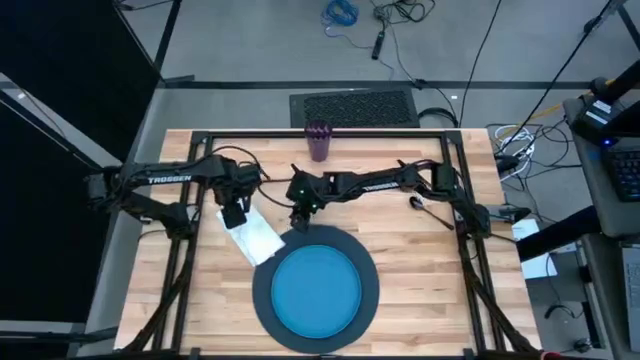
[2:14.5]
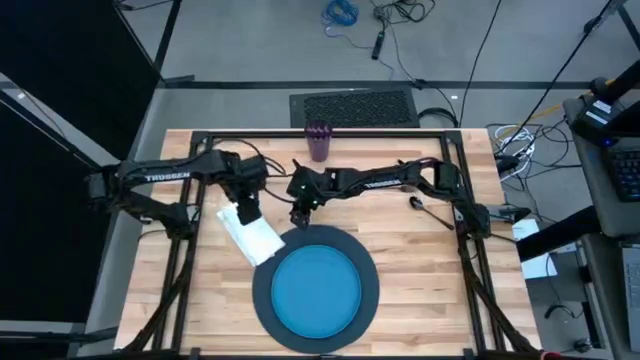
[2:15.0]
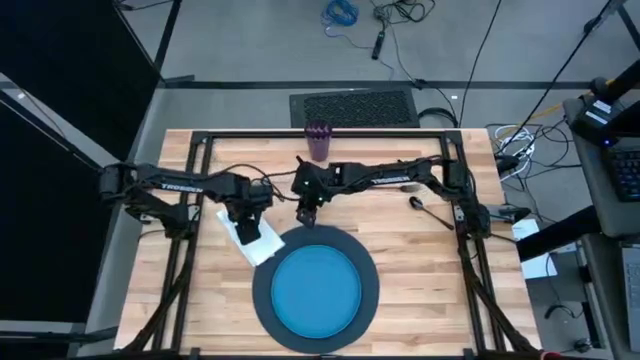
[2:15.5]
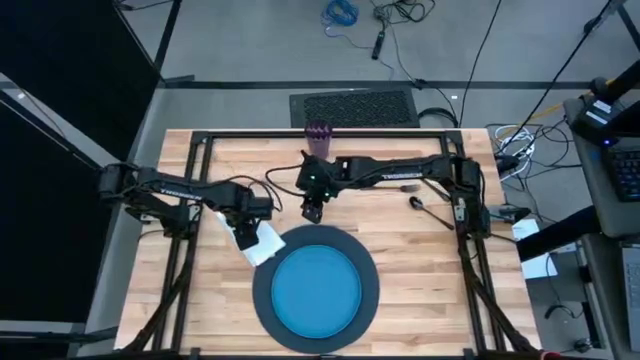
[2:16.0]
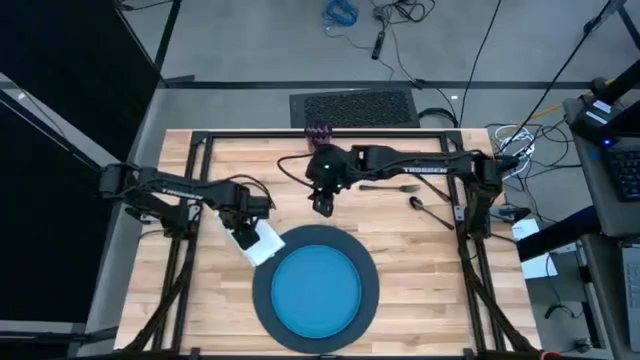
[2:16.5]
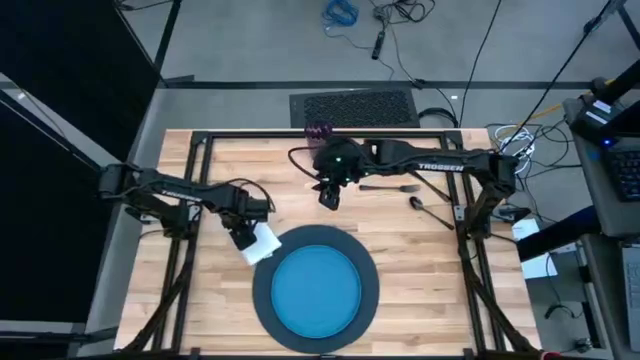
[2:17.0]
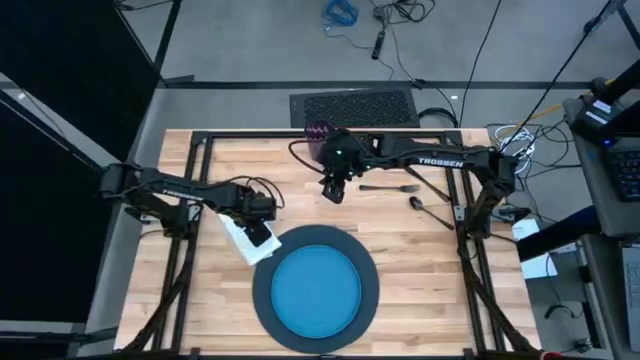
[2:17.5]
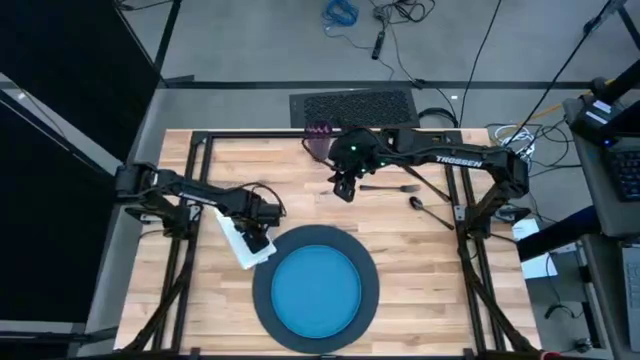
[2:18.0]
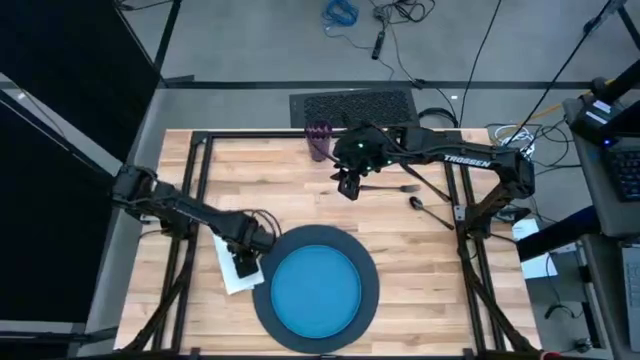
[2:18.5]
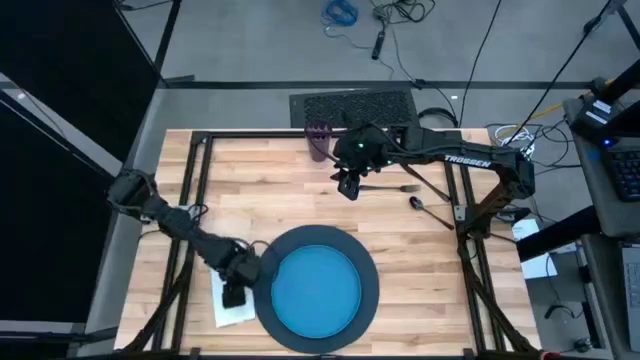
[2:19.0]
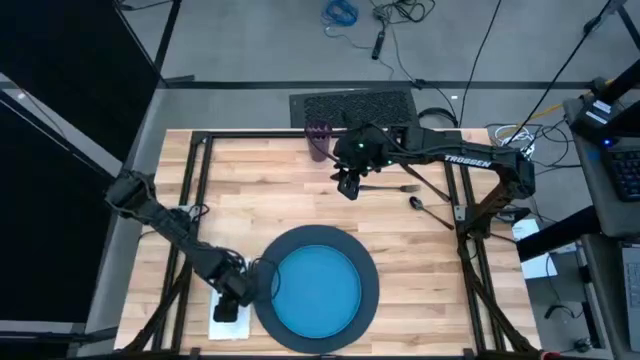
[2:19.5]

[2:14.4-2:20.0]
Task: Set table place
Move the white table napkin to the left of the dark blue placemat

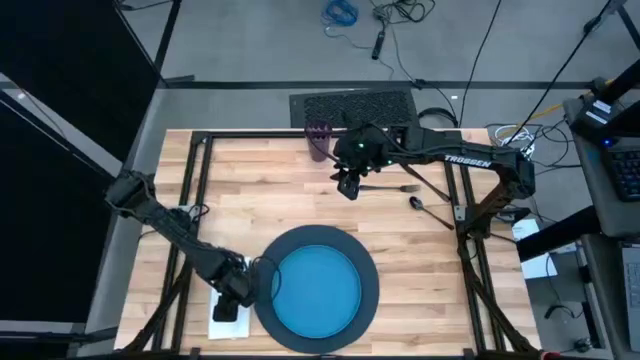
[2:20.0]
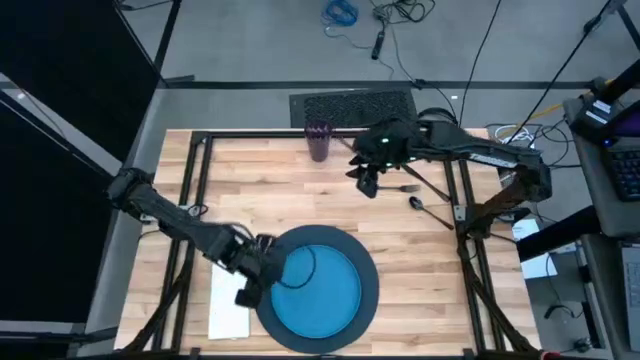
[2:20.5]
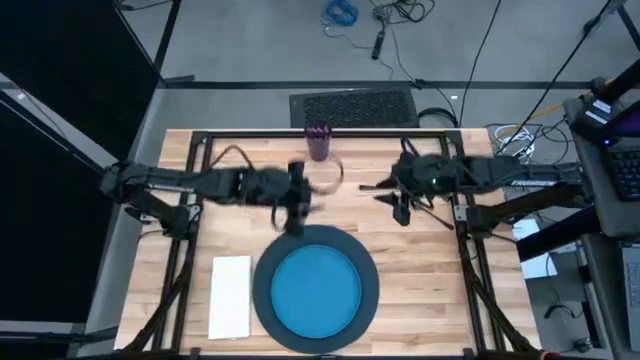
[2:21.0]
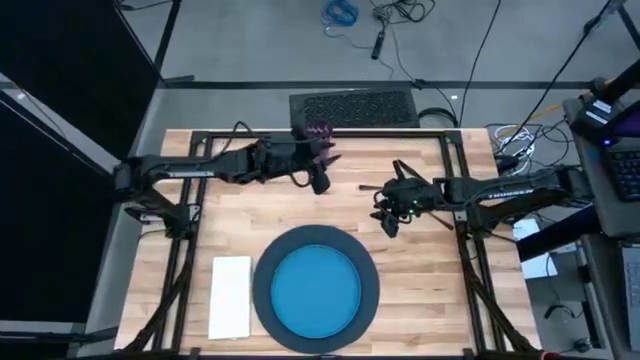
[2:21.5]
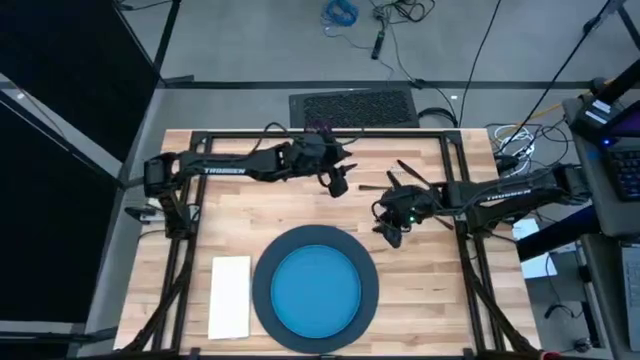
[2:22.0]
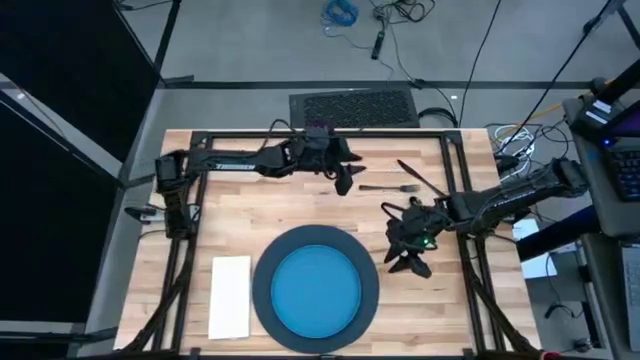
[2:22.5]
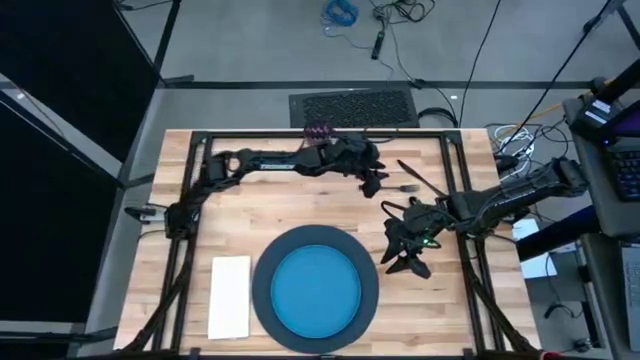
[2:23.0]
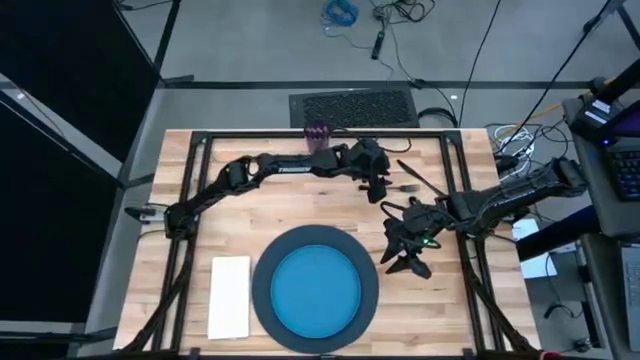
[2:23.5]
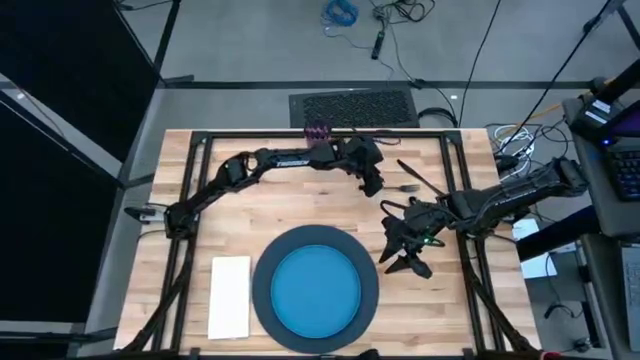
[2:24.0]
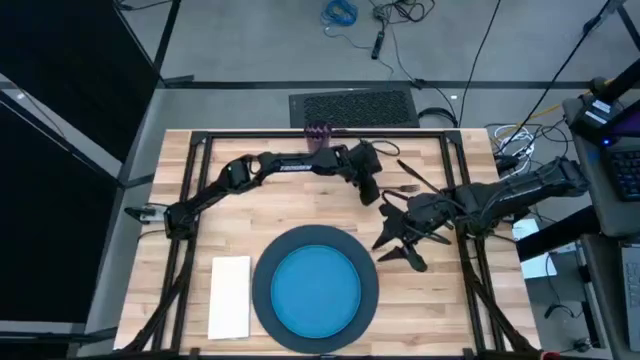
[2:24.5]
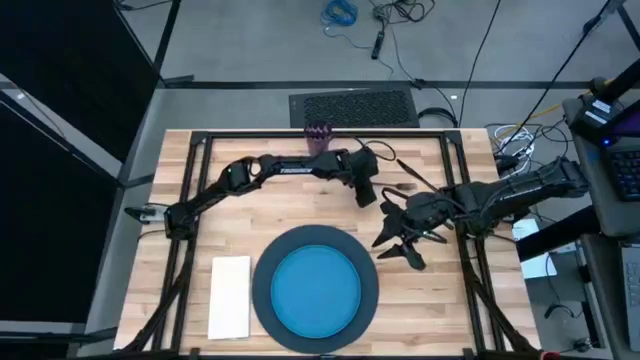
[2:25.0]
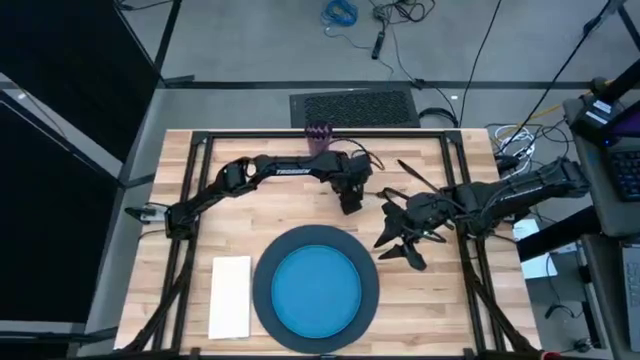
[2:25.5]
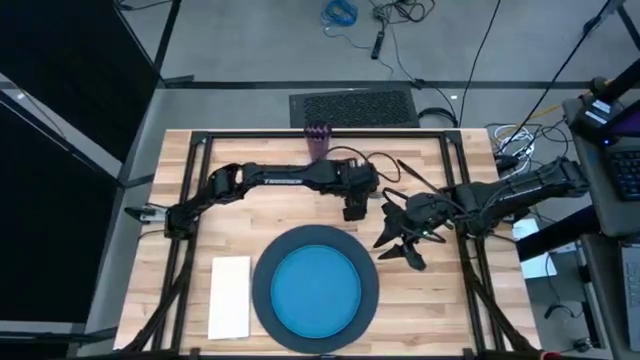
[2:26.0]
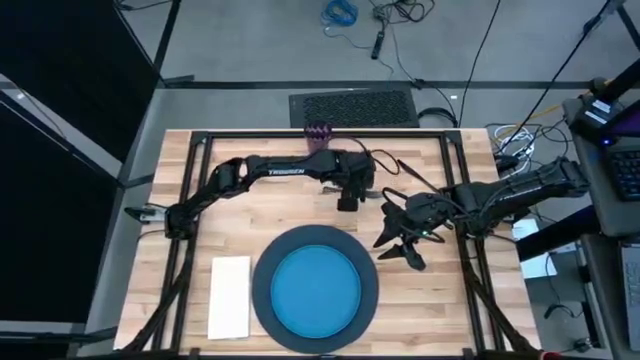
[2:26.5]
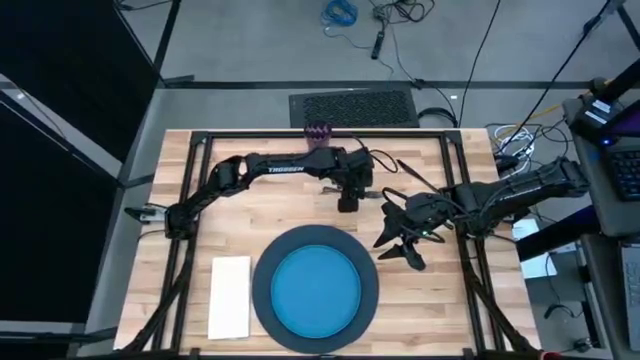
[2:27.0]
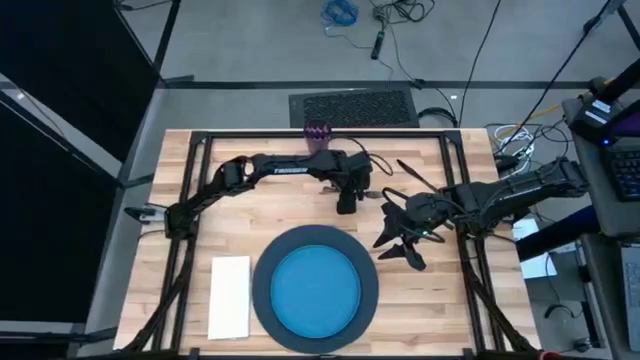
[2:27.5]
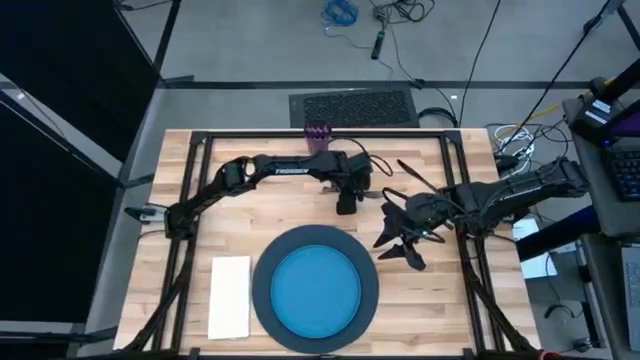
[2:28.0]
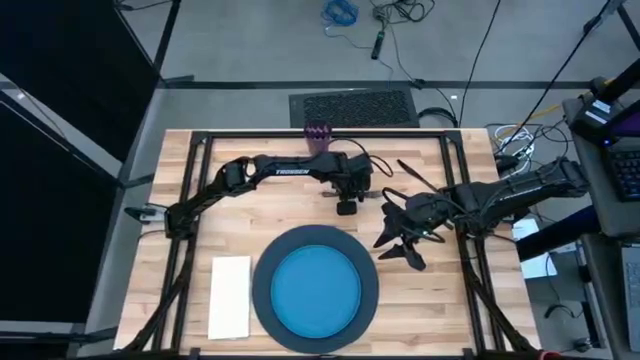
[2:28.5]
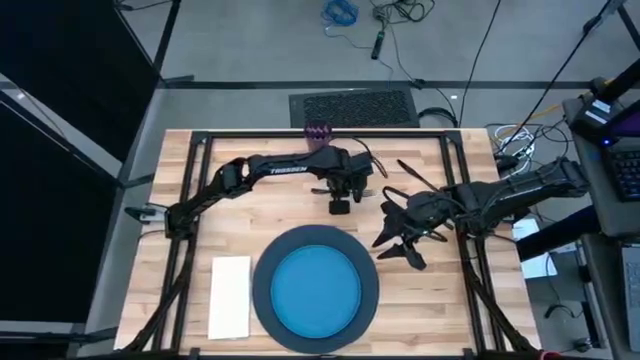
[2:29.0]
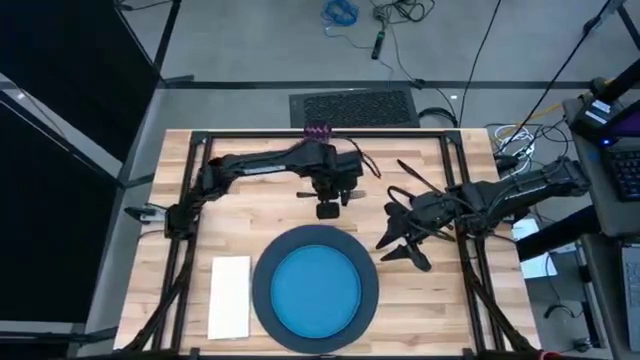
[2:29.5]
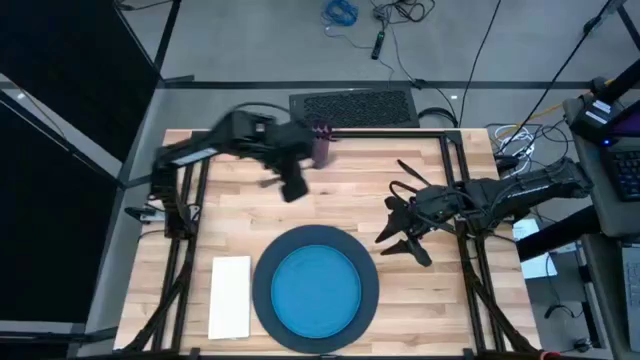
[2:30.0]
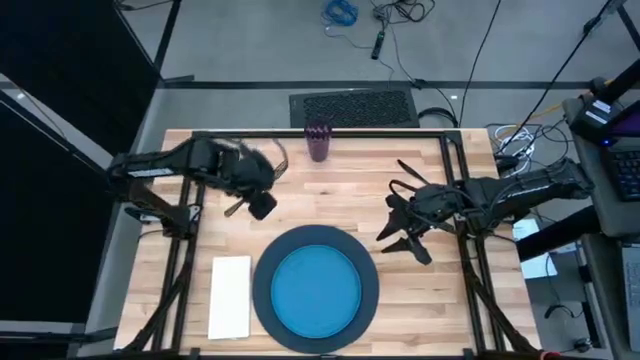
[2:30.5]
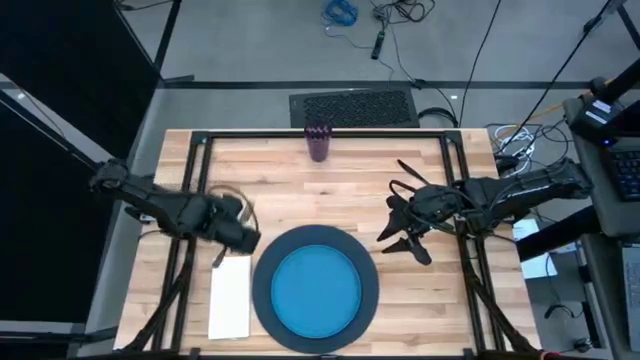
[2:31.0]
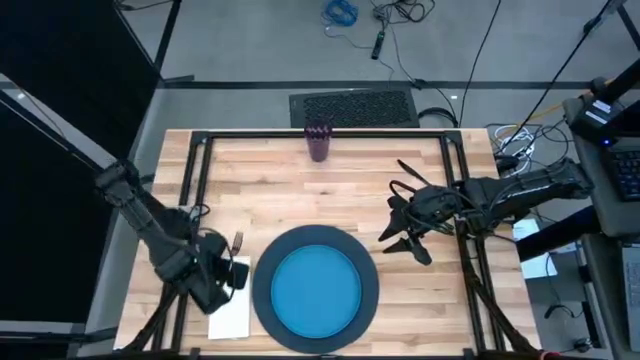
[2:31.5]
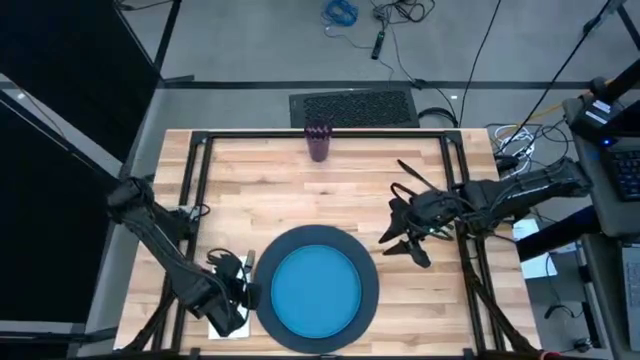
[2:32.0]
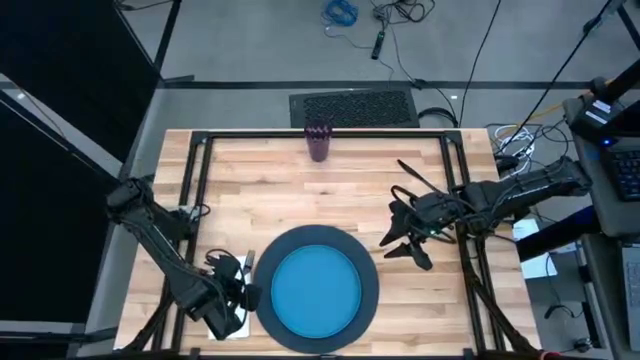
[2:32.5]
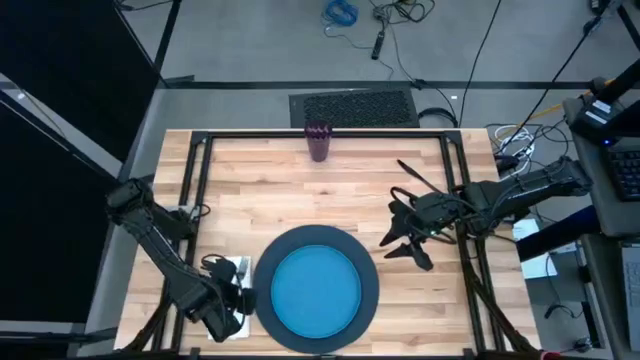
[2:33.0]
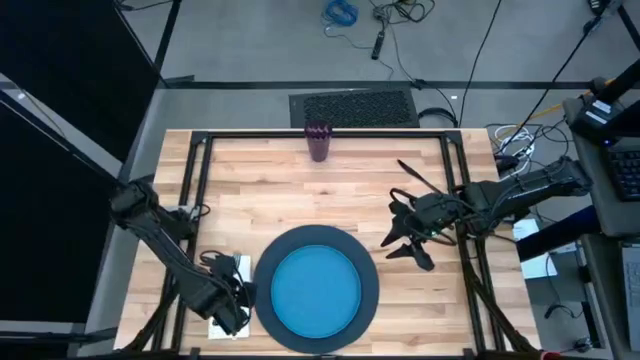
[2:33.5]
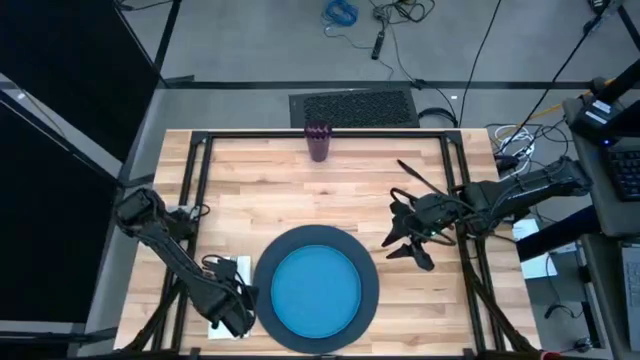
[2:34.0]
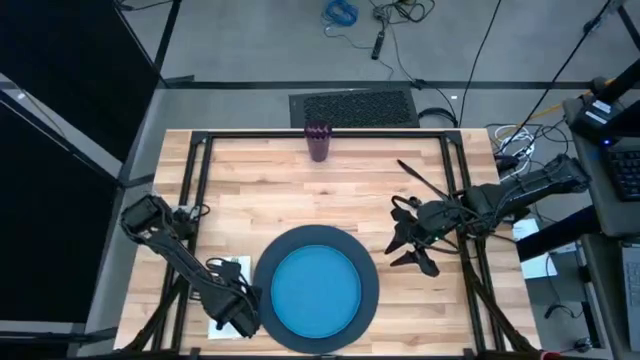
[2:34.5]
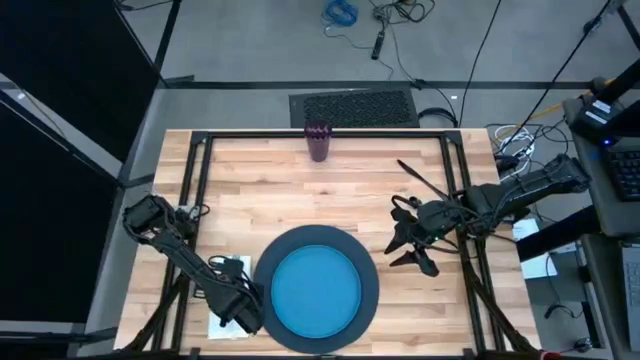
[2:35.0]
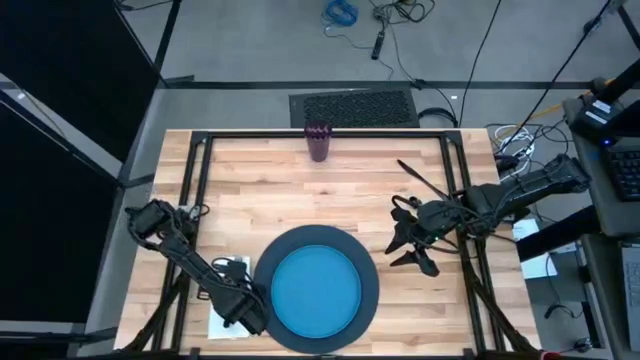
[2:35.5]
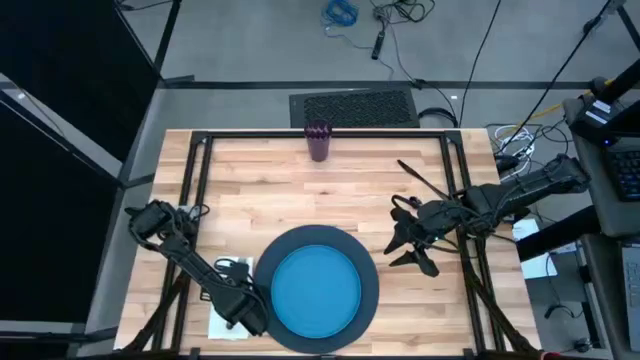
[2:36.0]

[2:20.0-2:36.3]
Put the black fork on the white table napkin
